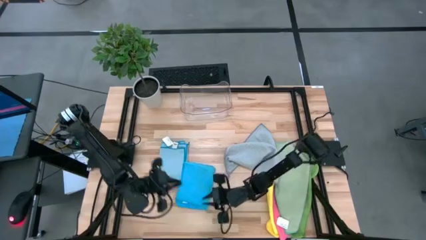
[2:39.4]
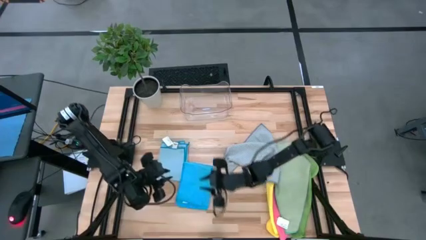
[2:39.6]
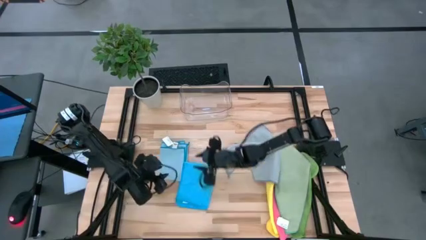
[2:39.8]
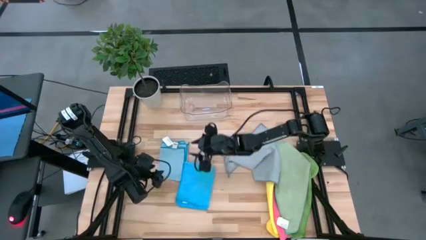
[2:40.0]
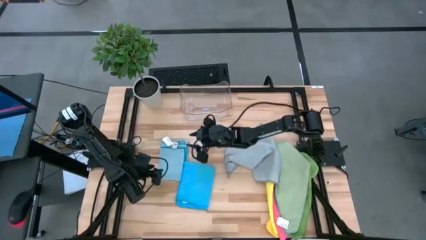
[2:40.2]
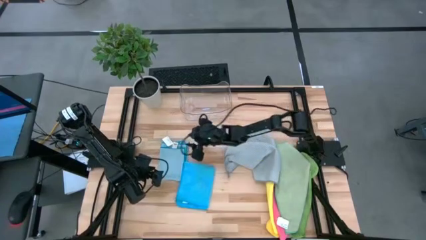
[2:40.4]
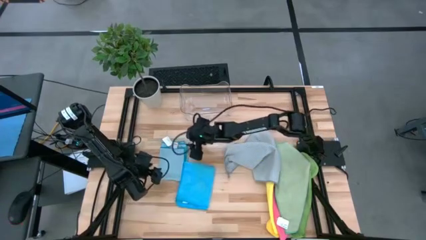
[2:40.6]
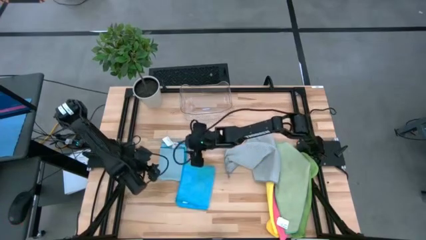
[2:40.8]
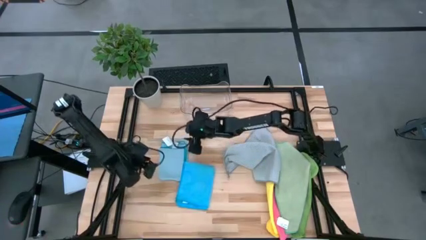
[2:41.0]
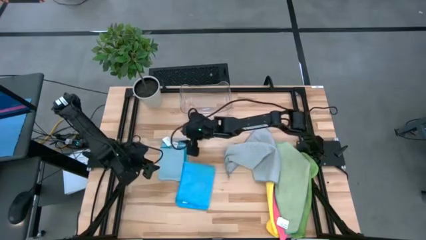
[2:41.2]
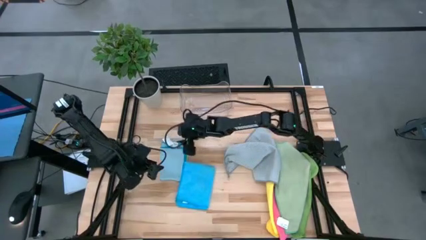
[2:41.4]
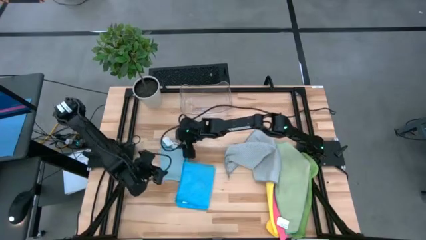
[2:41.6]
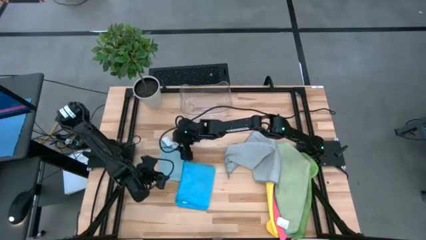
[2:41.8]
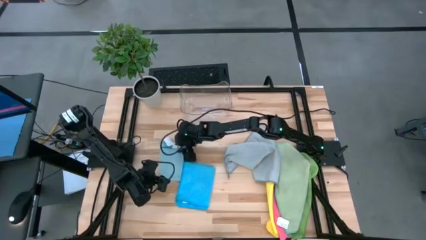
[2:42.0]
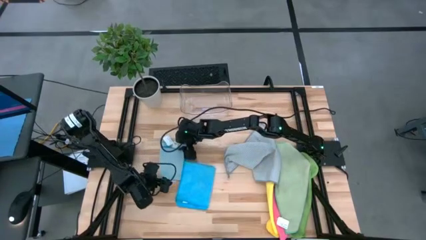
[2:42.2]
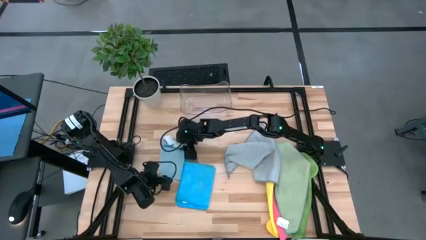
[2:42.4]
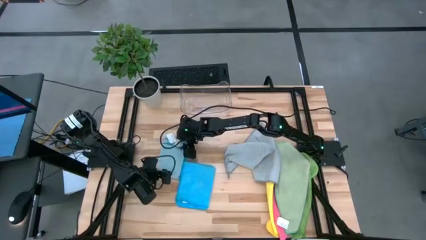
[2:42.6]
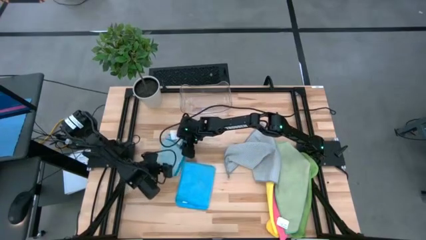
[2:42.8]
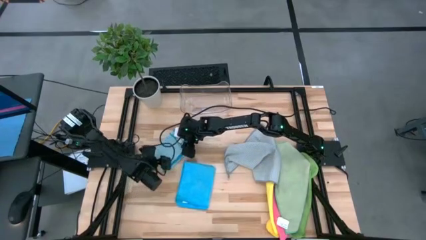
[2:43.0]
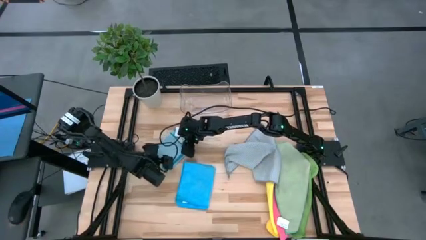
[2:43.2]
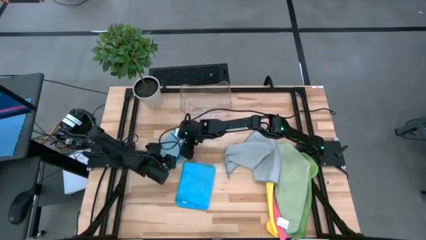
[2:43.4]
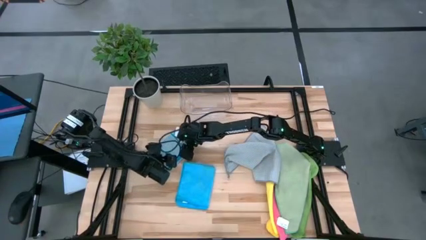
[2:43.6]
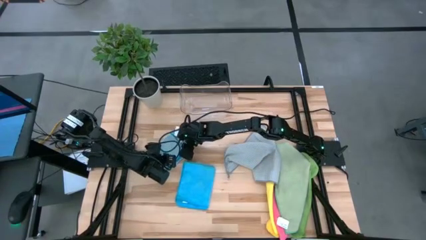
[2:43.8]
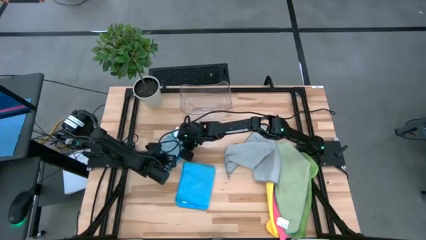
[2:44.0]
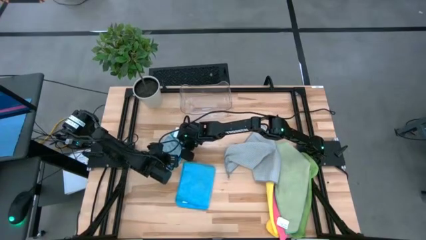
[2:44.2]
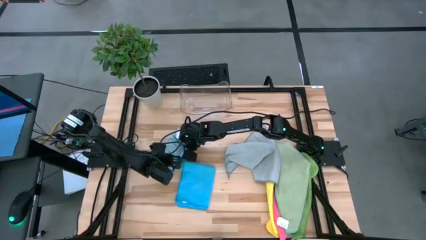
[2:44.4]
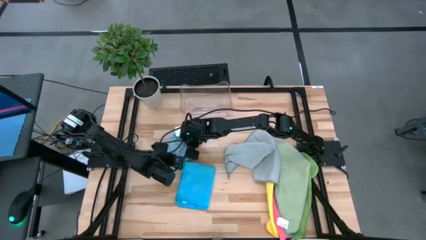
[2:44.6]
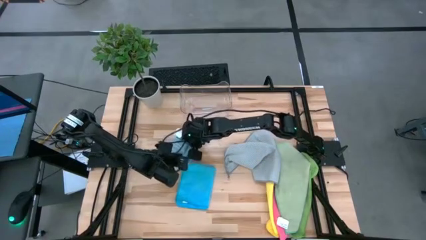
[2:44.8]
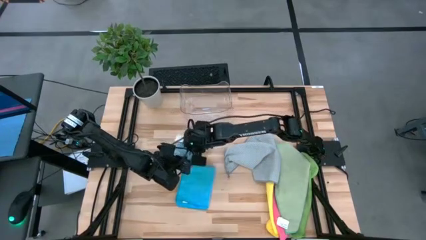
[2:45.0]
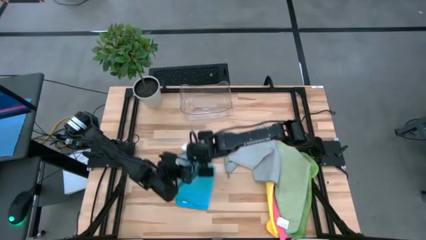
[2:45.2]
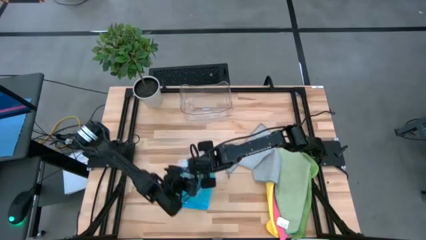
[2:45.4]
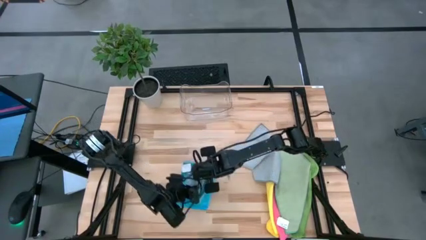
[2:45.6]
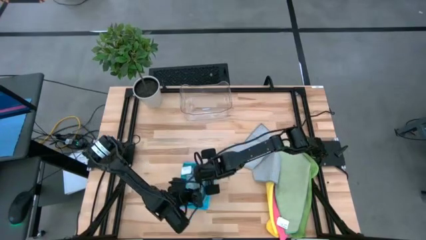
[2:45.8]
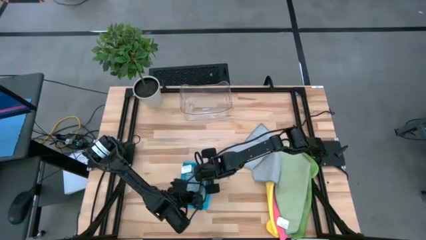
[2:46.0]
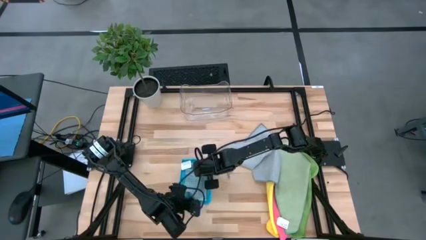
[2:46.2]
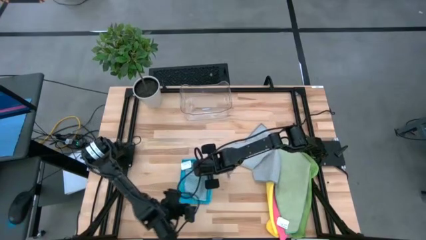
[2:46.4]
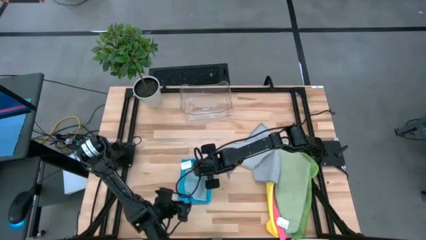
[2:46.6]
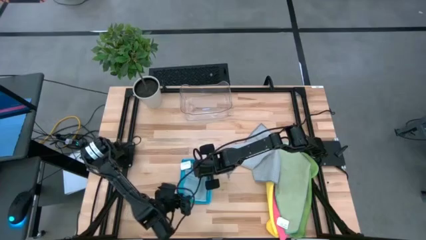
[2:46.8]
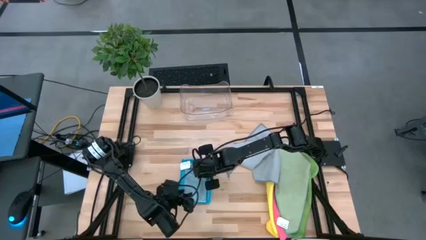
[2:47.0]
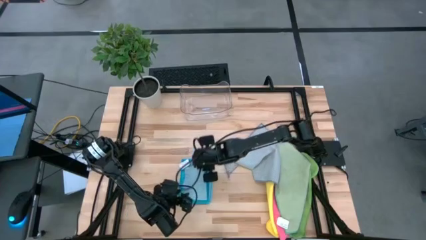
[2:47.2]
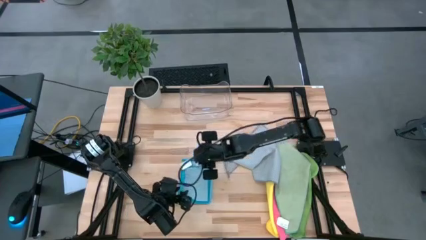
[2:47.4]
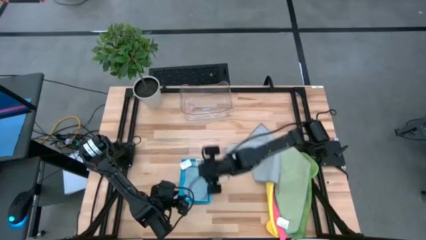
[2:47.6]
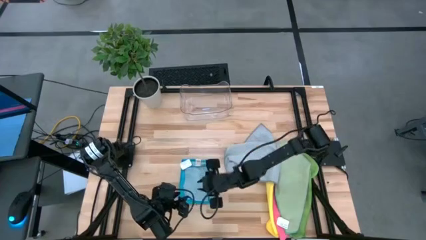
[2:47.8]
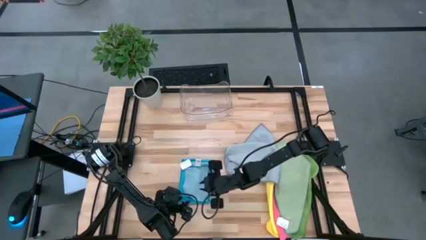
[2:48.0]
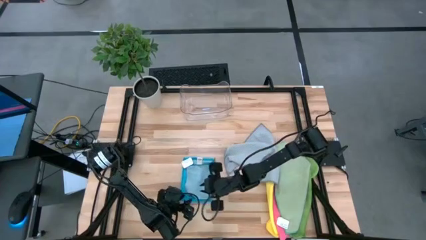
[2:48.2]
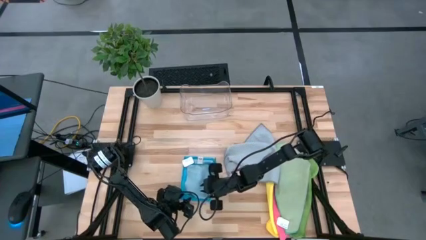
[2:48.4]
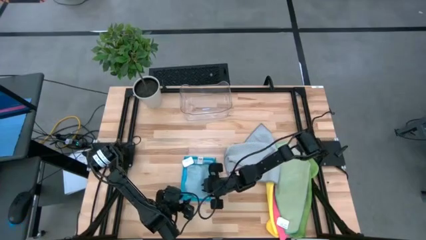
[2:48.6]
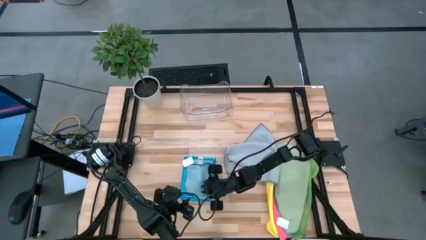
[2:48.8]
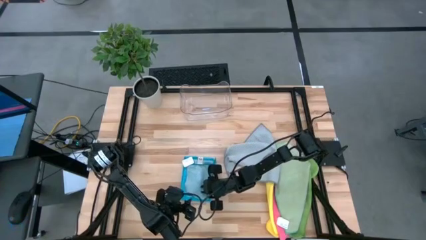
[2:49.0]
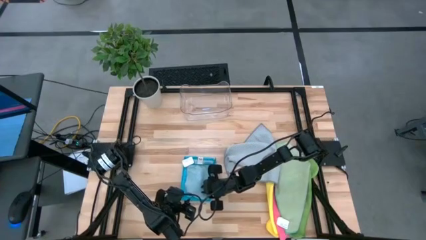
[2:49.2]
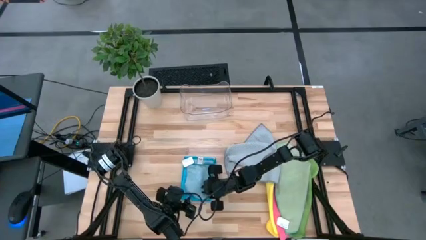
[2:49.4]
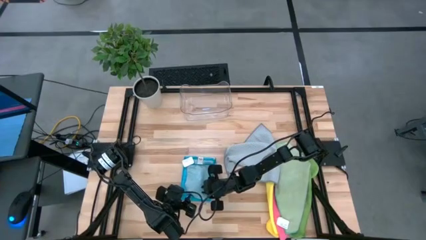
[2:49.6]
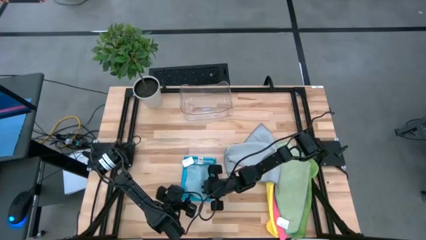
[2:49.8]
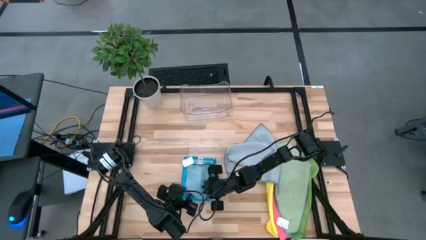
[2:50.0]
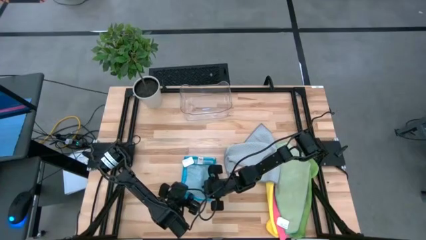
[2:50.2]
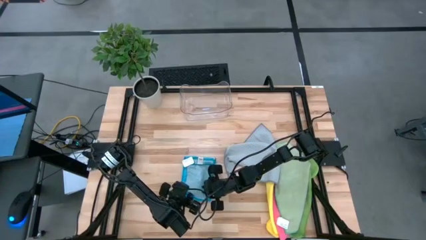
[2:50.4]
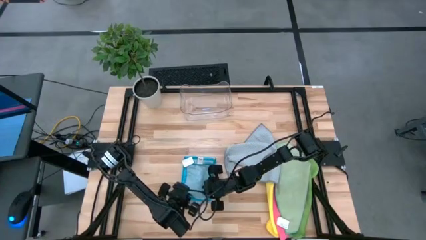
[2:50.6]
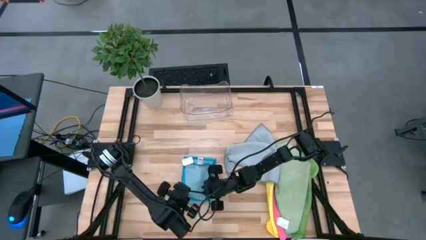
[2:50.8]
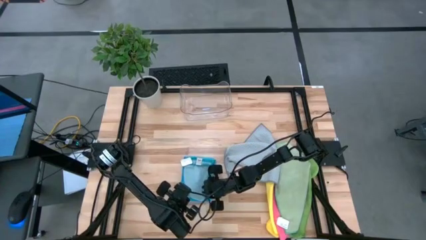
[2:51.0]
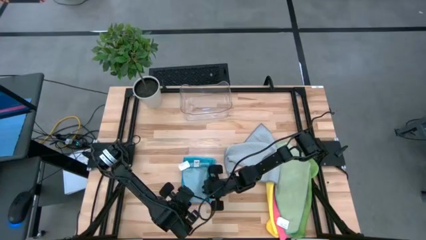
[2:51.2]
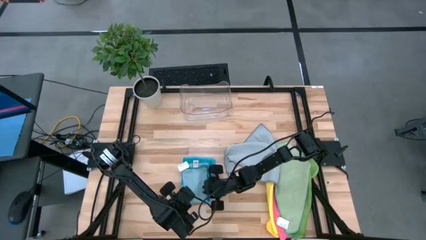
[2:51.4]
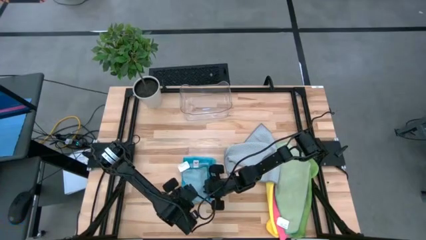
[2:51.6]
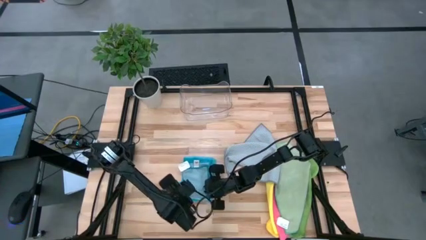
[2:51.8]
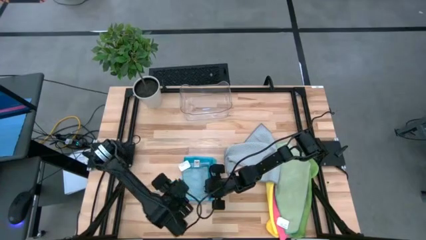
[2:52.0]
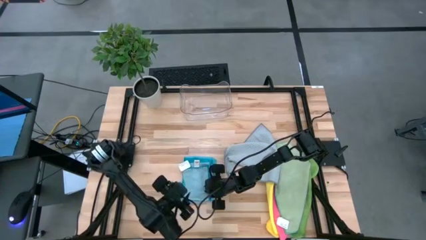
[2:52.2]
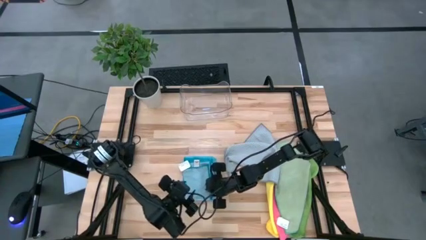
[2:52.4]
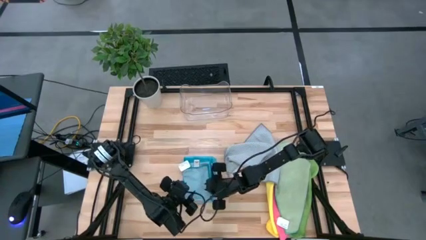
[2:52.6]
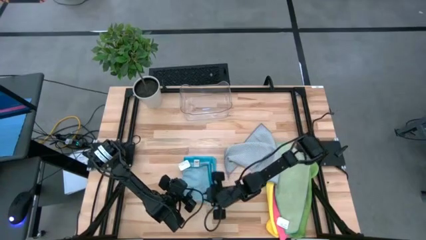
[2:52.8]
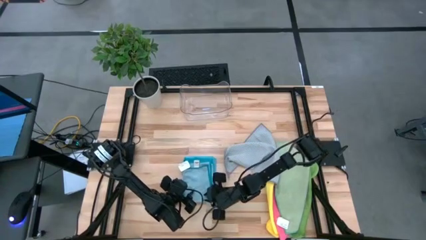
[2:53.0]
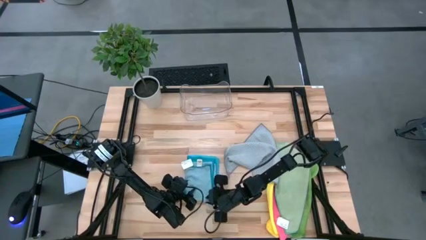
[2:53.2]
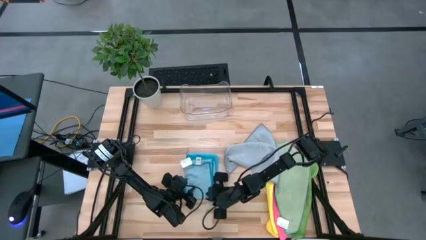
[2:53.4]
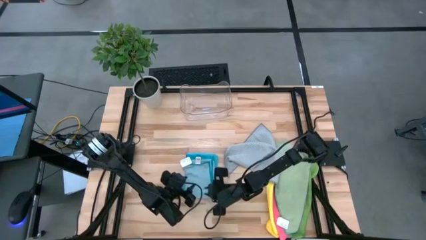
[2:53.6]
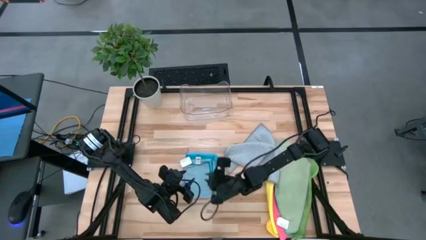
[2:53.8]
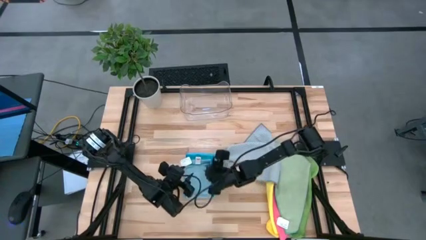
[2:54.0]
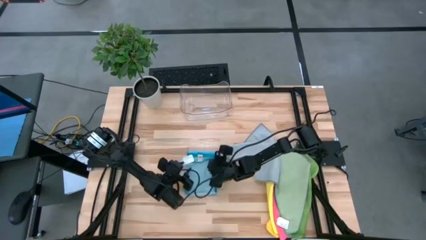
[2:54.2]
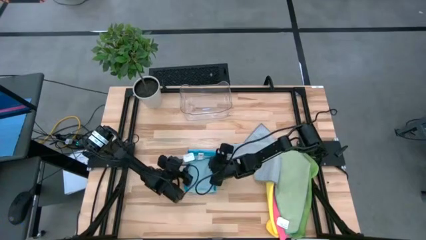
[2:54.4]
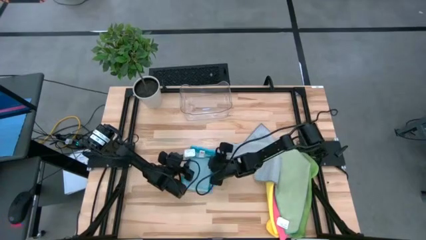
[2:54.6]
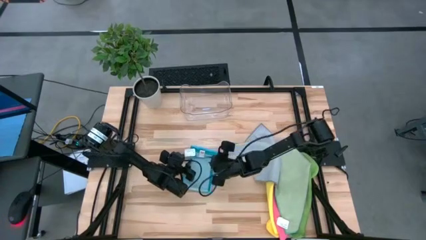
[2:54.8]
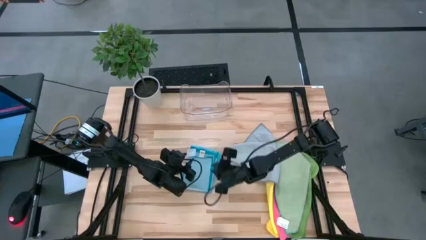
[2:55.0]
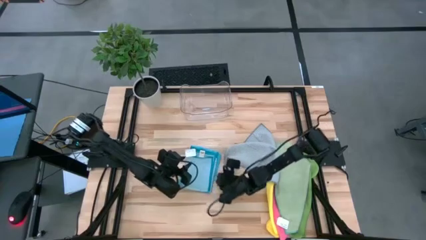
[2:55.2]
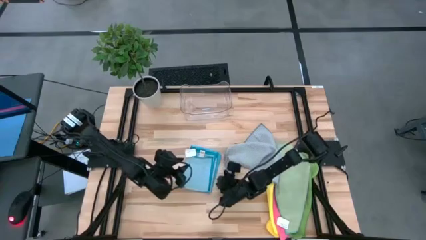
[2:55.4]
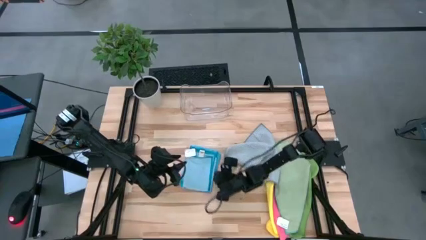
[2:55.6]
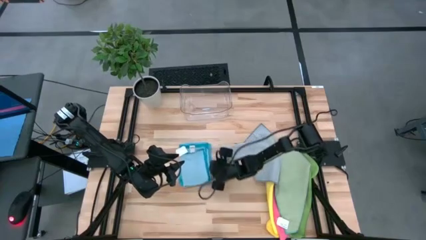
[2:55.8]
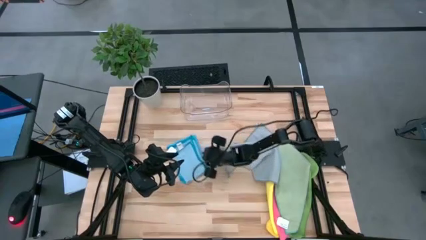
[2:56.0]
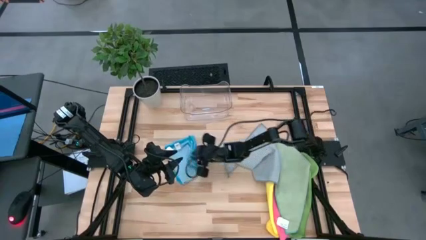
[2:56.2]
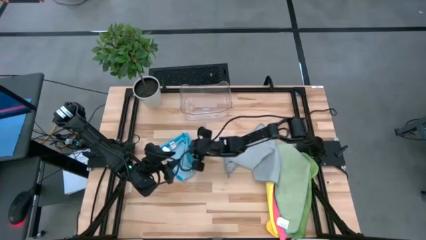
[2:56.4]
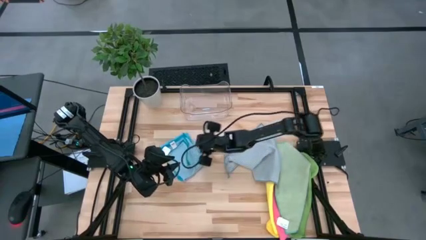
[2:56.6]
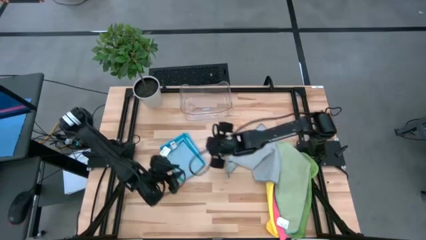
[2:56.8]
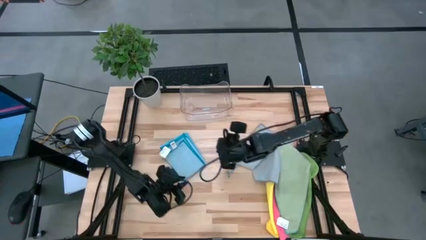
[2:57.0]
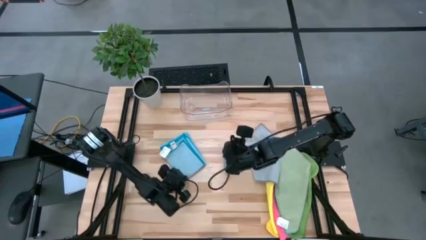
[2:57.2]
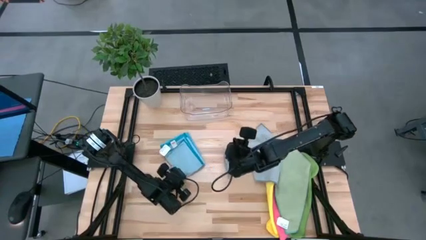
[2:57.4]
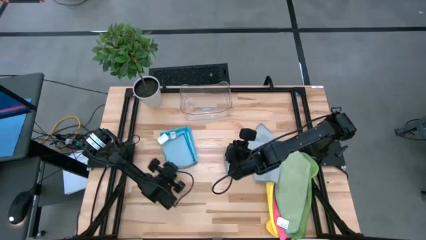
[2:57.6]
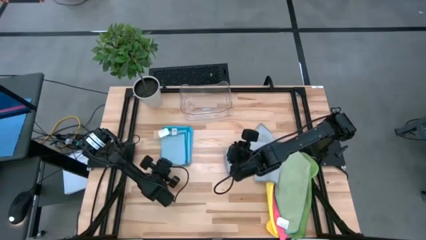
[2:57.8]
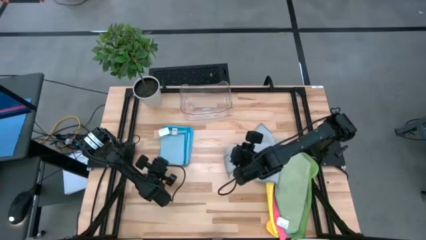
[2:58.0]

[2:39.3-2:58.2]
Task: Fold microfiber towels
Stack the folded light blue microfiber cloth on top of the folded blue microfiber cloth
